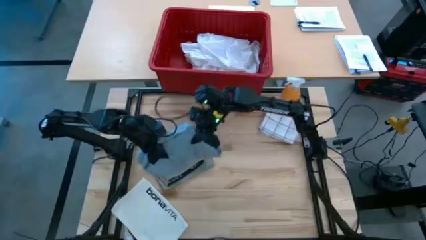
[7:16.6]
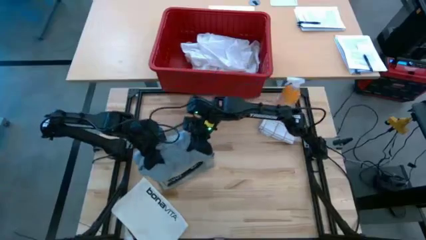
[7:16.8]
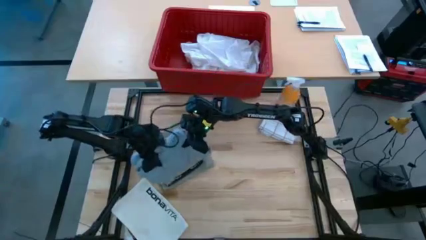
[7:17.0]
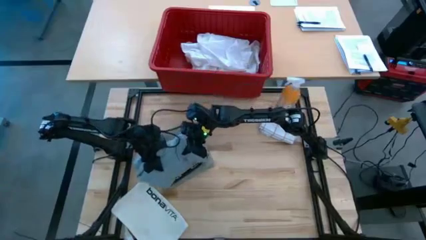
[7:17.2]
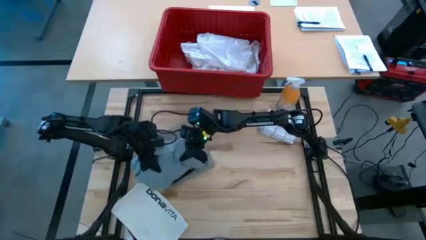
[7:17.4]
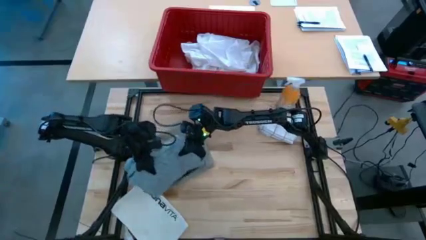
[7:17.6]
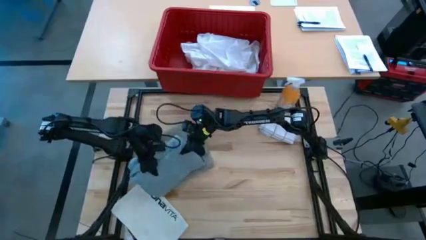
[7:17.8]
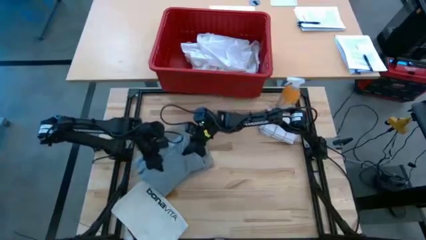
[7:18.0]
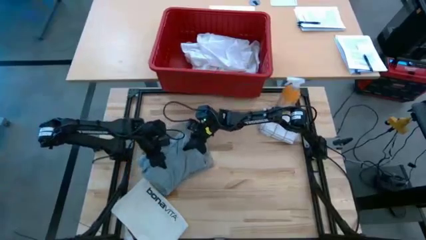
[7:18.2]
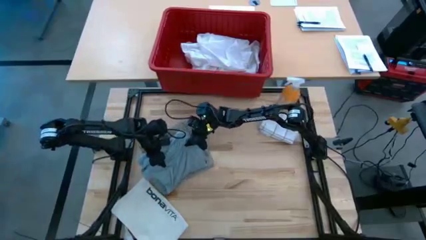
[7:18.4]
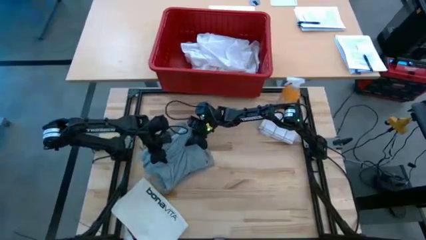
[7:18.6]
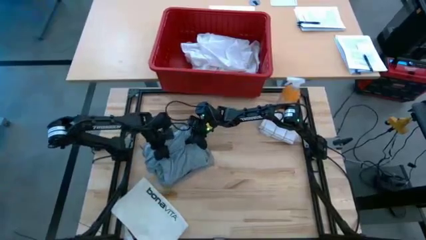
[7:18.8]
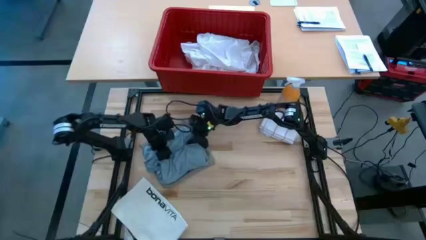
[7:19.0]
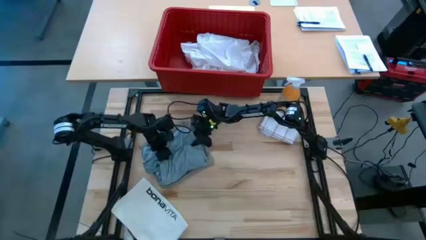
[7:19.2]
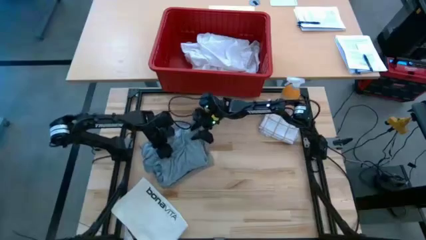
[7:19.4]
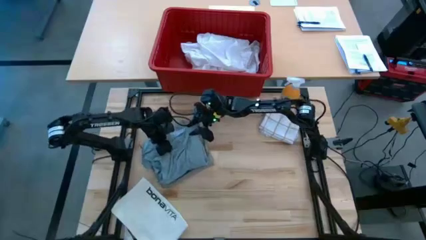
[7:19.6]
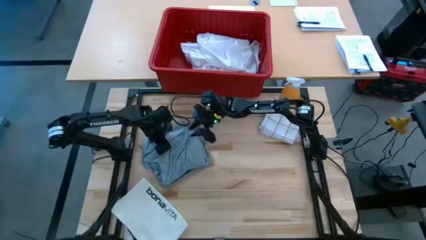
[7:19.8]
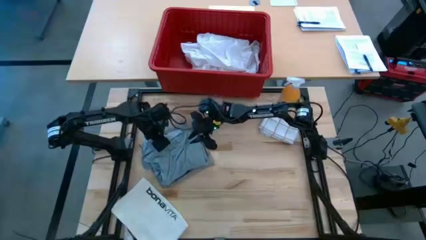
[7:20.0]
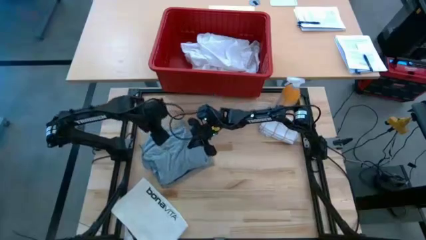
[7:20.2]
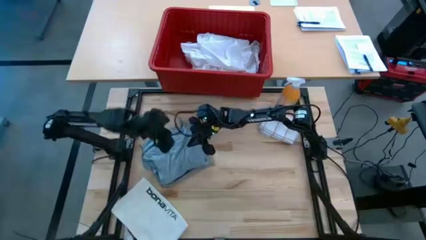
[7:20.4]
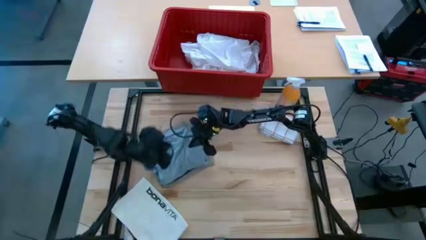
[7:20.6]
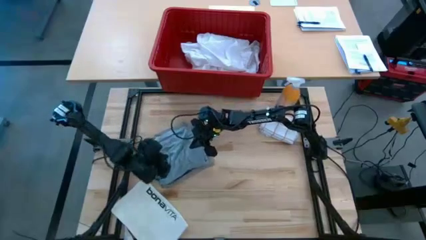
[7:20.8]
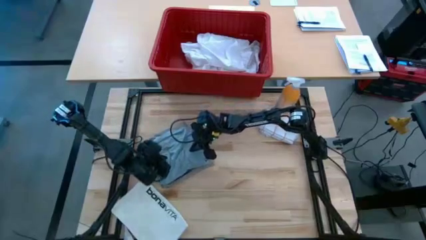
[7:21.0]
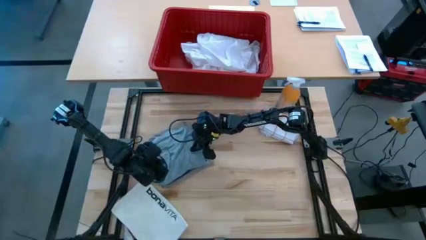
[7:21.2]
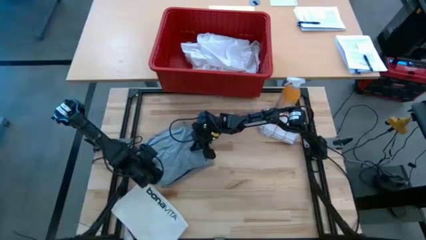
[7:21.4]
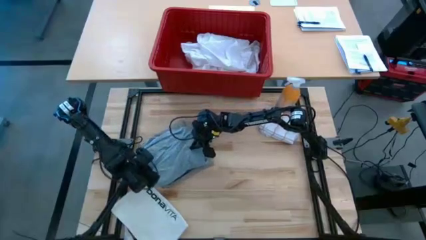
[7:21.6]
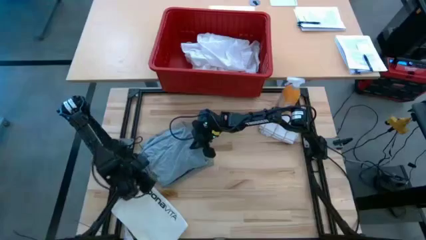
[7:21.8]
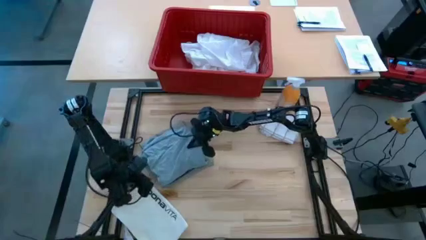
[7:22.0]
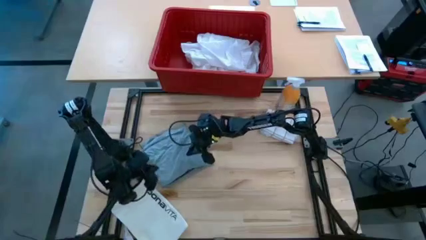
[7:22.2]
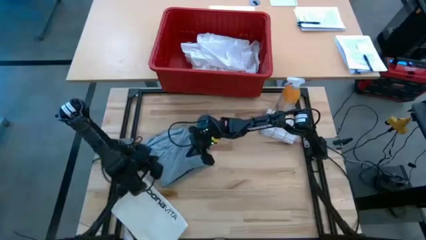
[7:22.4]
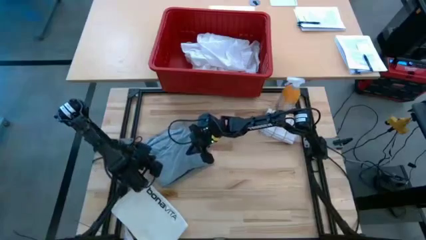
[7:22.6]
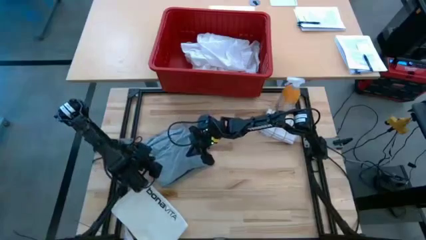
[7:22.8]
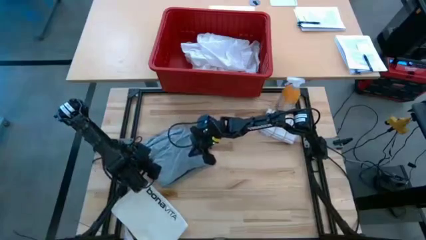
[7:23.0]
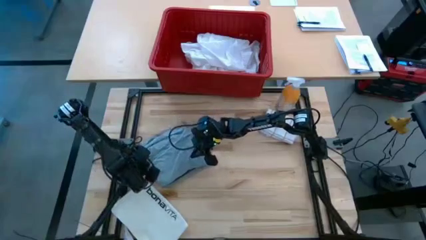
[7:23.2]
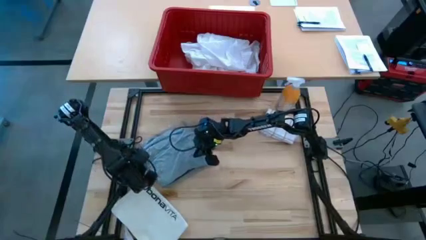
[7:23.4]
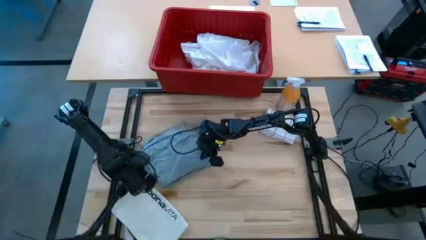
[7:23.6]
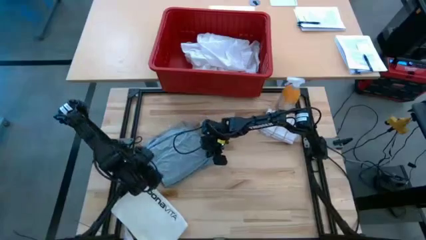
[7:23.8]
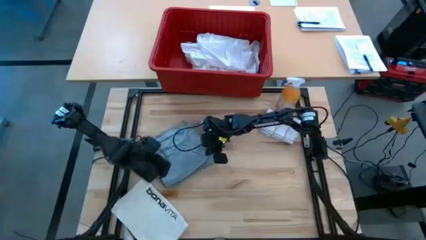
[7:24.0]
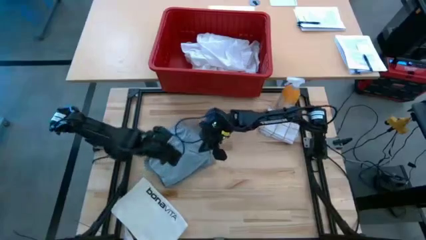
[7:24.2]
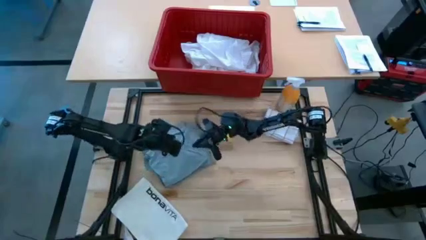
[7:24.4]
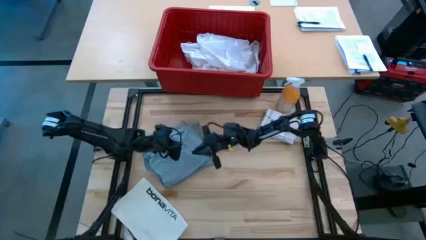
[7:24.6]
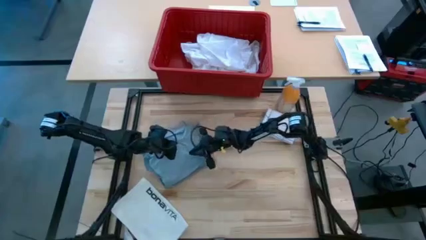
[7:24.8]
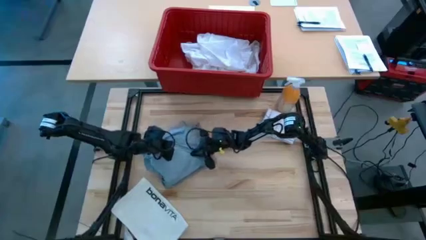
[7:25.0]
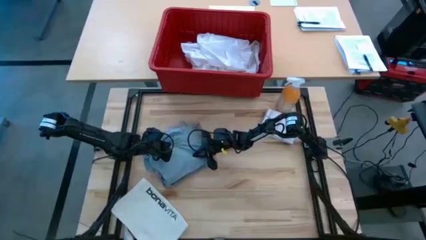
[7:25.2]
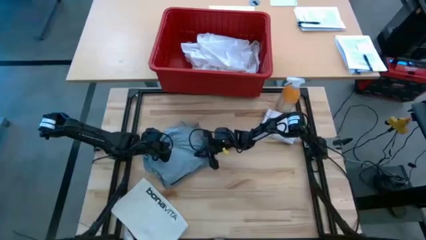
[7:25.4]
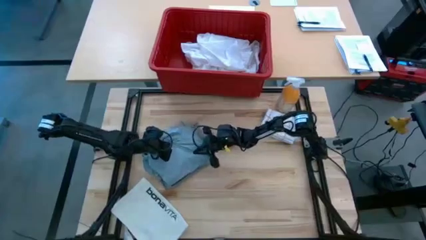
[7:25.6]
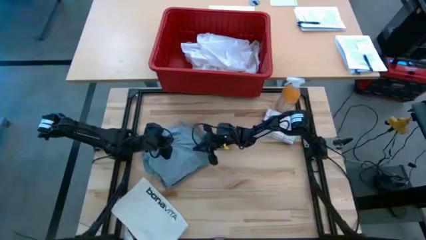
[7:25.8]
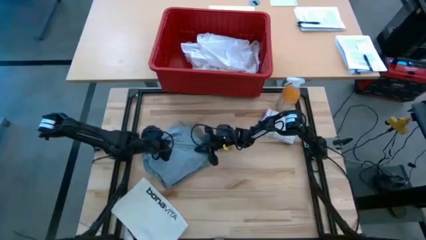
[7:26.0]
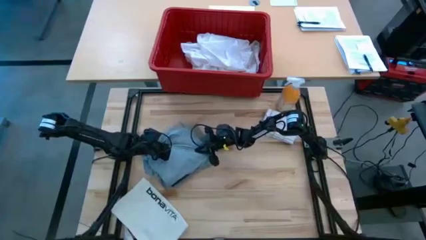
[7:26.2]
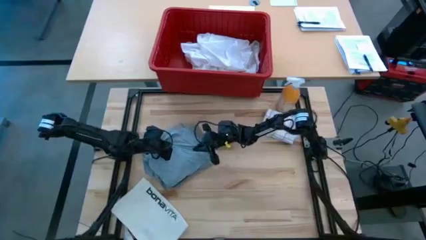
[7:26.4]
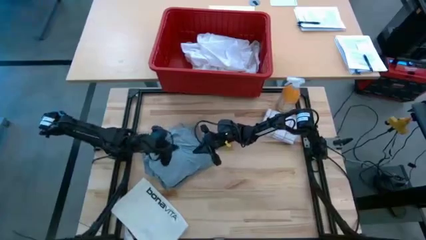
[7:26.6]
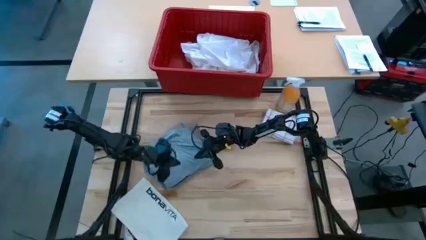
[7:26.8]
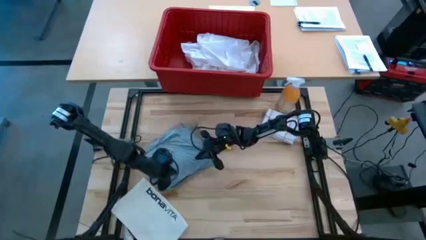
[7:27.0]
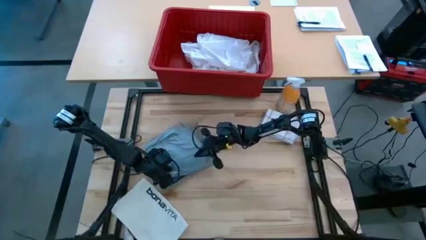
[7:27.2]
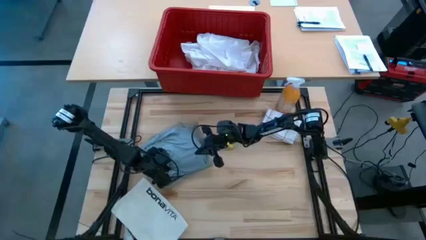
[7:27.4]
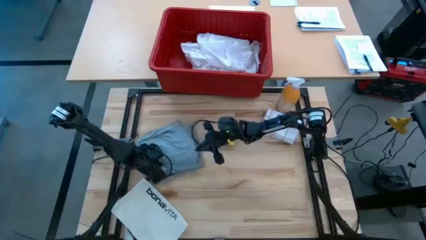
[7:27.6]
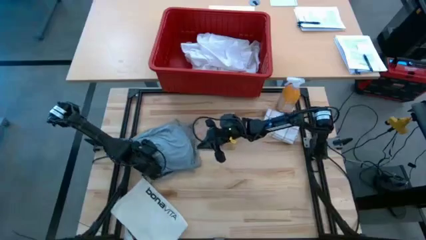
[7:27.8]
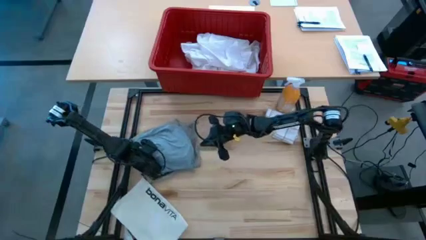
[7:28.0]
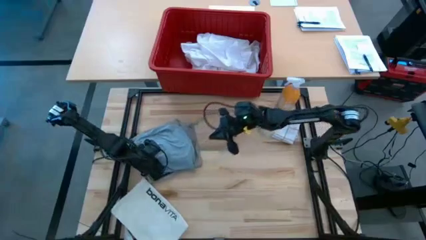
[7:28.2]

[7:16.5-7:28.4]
Task: Fold laundry
Stack the folded gray shirt on top of the folded gray shorts

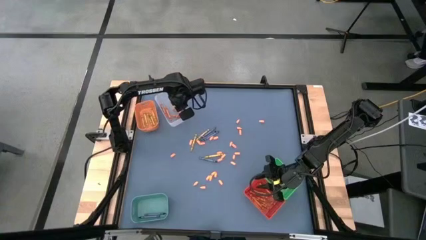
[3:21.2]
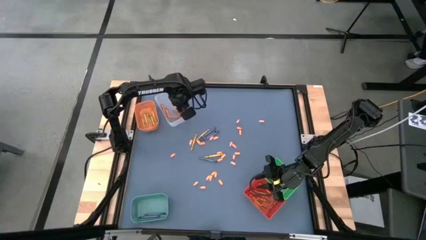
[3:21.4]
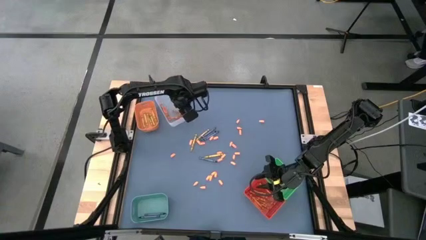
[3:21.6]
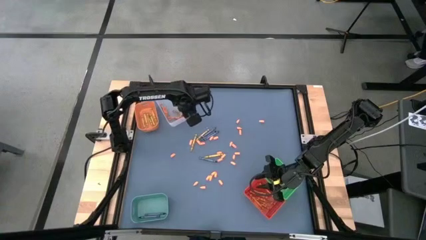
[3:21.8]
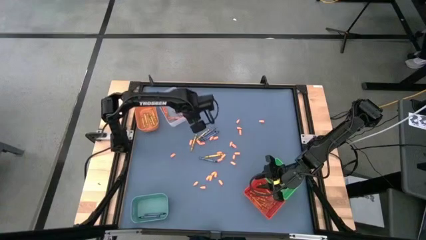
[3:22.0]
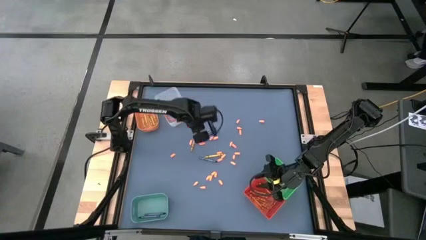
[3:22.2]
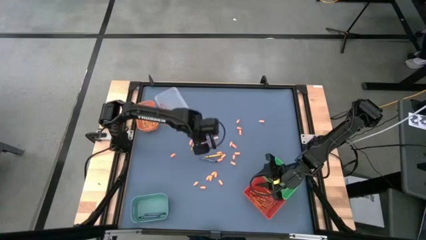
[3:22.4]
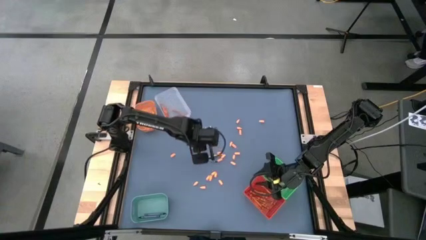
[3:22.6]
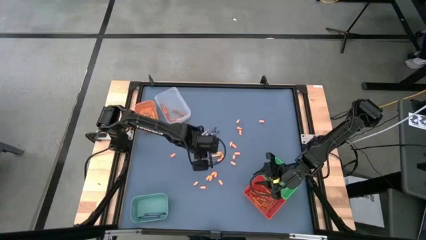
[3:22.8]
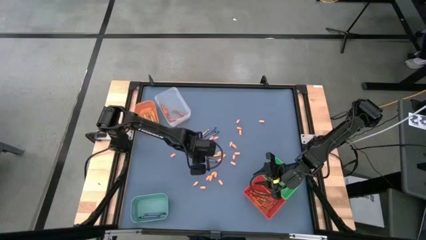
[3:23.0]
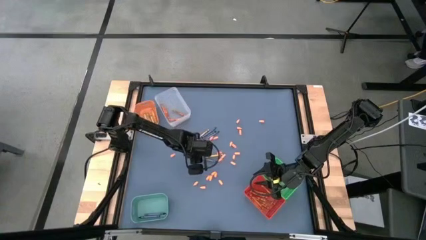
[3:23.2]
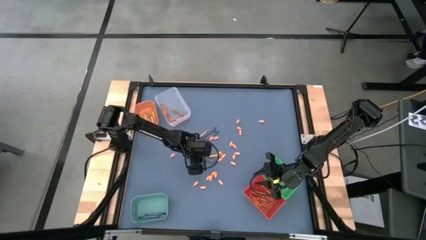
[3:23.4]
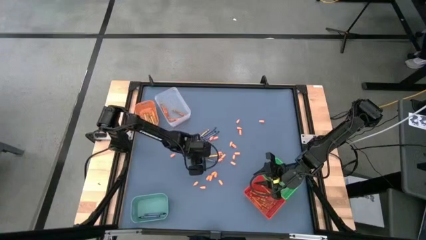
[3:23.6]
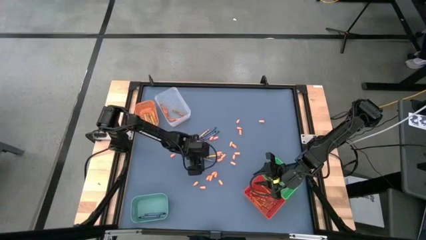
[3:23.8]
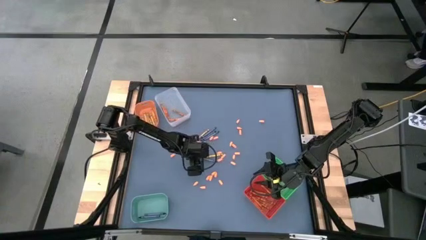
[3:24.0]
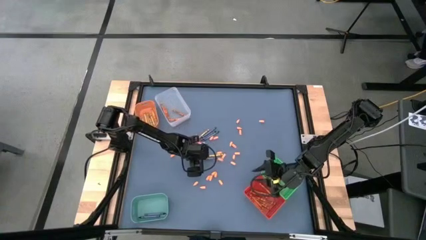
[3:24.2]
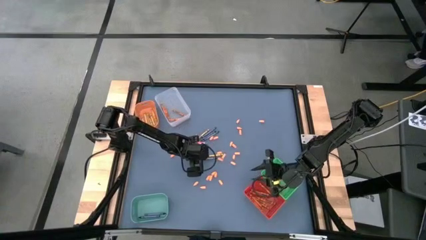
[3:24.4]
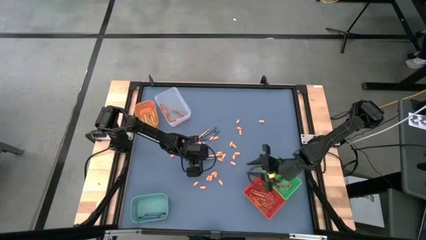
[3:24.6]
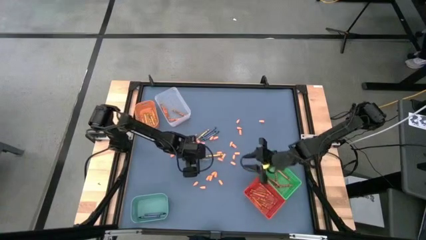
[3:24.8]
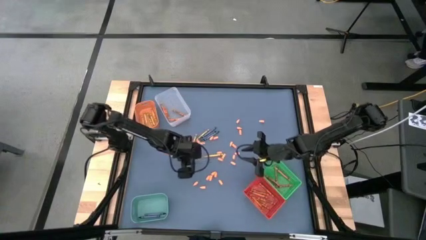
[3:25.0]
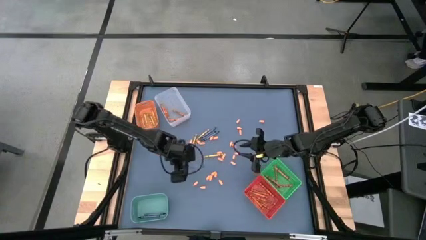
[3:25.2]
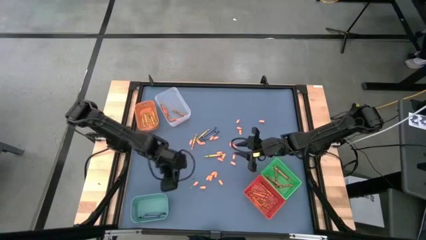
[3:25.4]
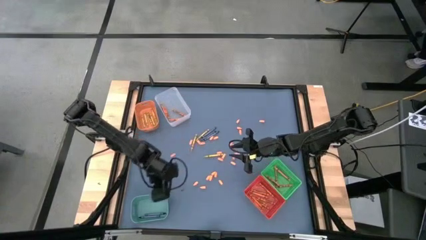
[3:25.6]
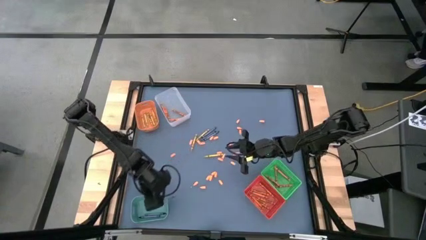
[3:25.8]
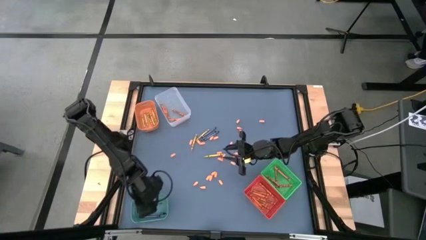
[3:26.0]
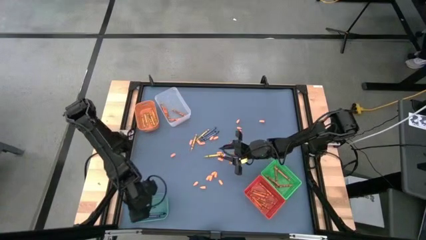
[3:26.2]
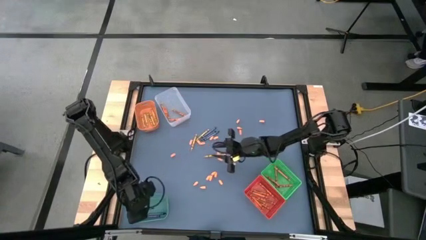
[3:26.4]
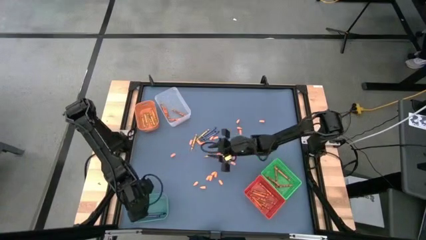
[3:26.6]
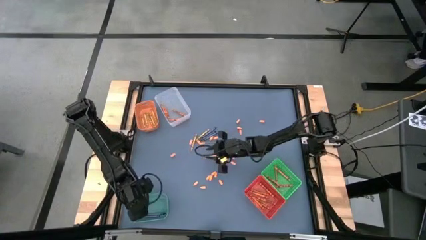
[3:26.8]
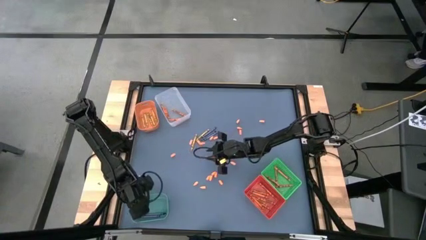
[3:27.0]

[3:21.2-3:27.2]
Task: Sort crayons
Put the blue crayon into the blue bin
